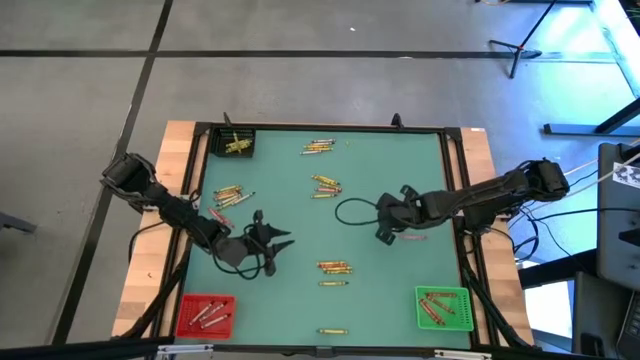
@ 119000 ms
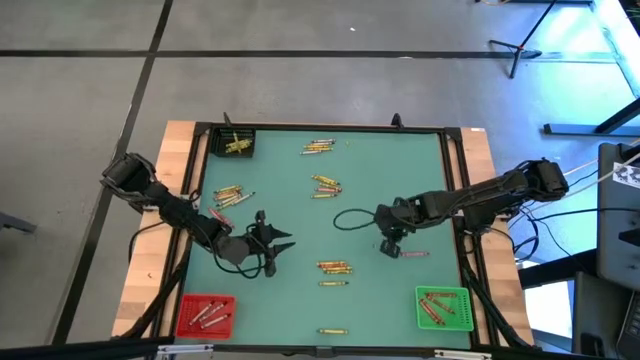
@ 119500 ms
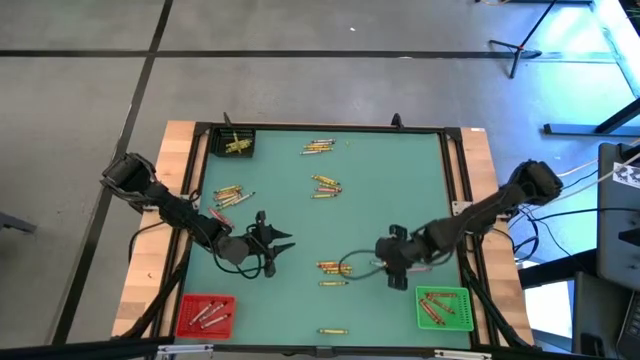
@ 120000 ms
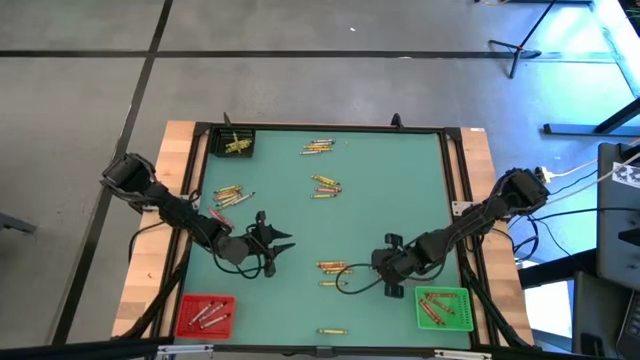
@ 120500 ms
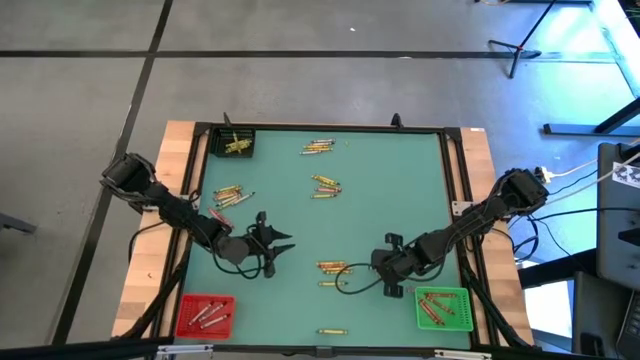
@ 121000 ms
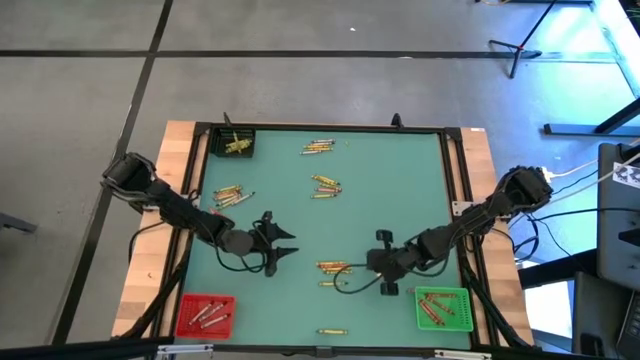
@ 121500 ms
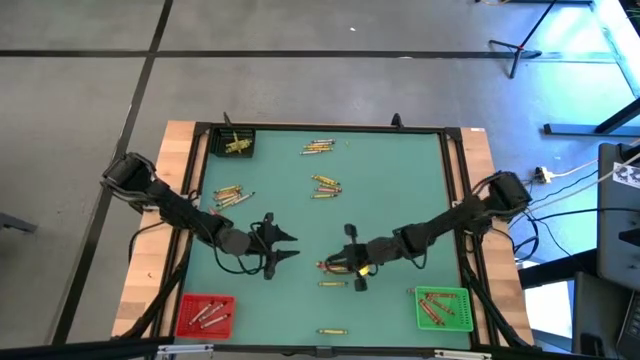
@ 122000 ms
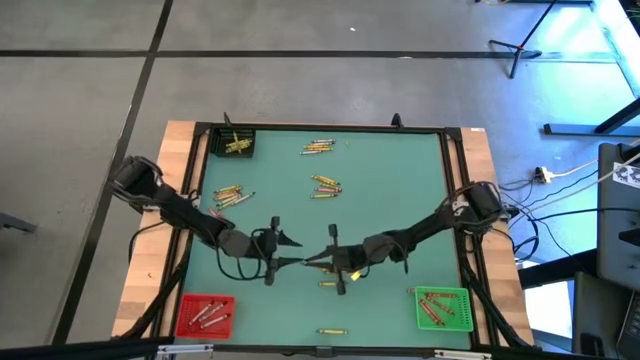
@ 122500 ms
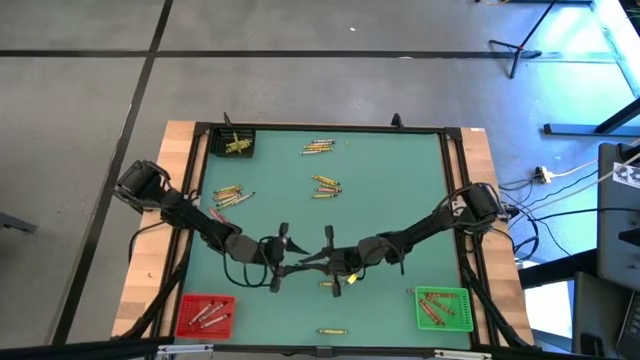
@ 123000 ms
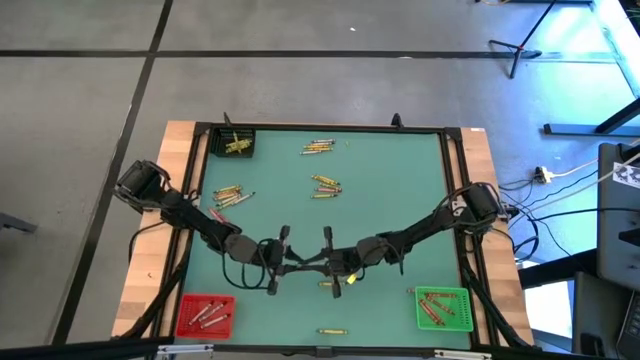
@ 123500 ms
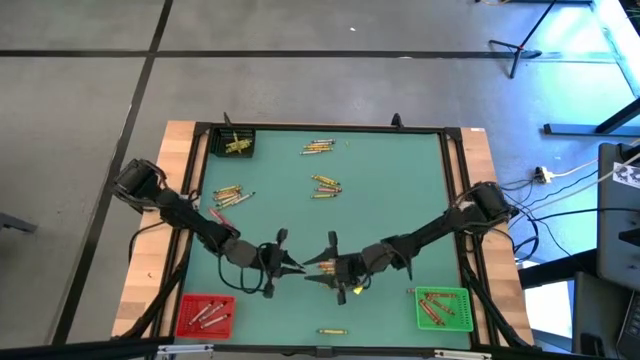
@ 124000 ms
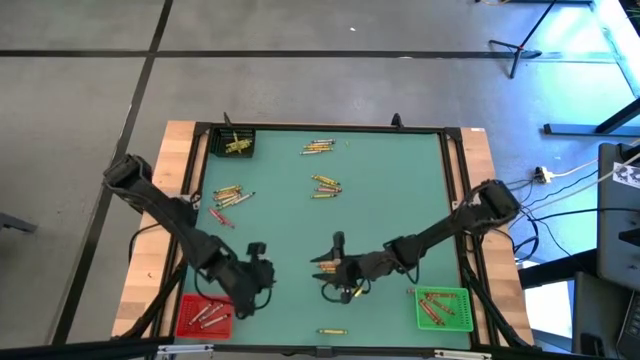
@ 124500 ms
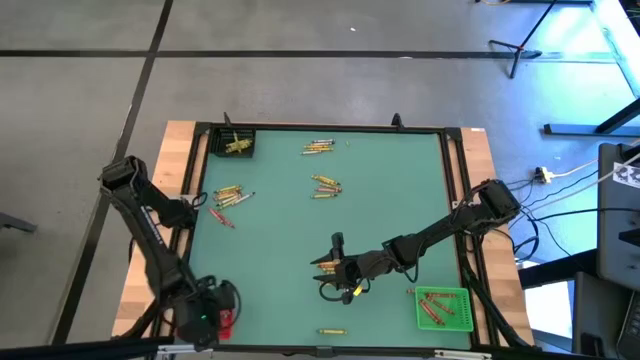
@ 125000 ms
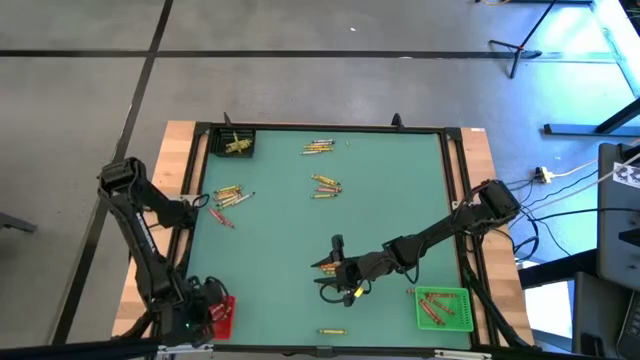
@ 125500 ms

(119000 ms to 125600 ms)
Task: Sort crayons
Put the black crayon into the red bin

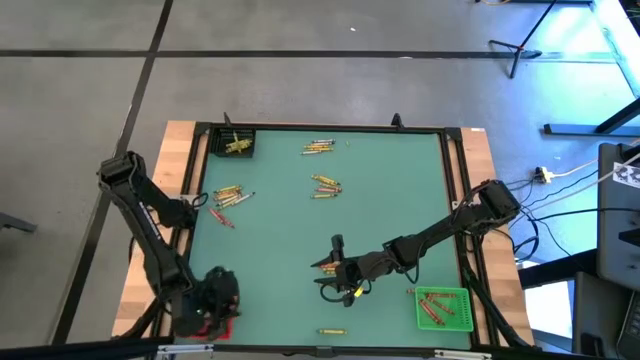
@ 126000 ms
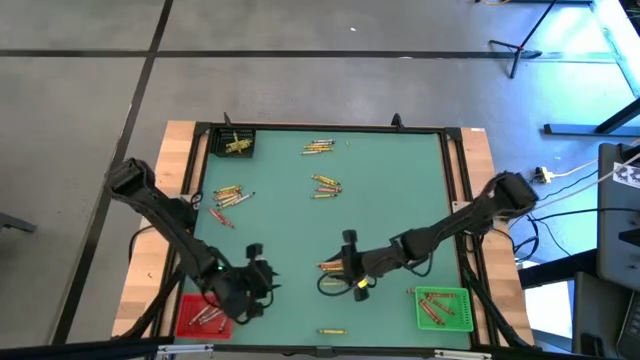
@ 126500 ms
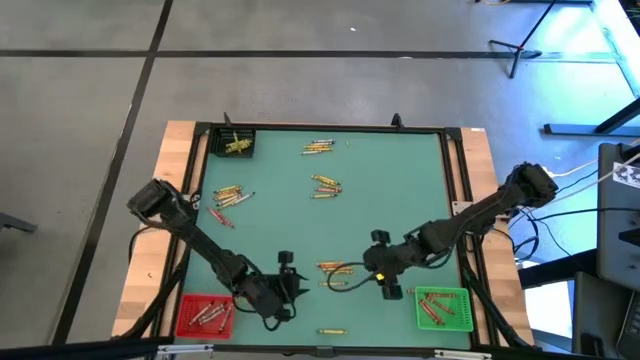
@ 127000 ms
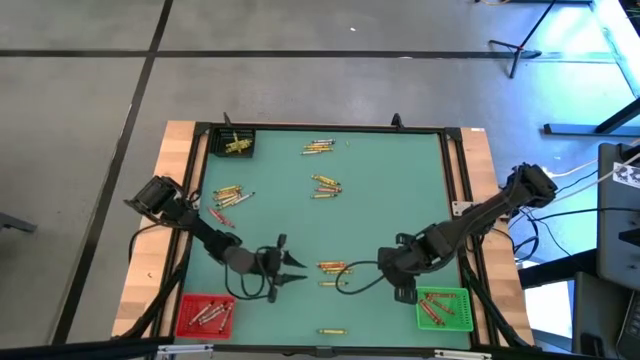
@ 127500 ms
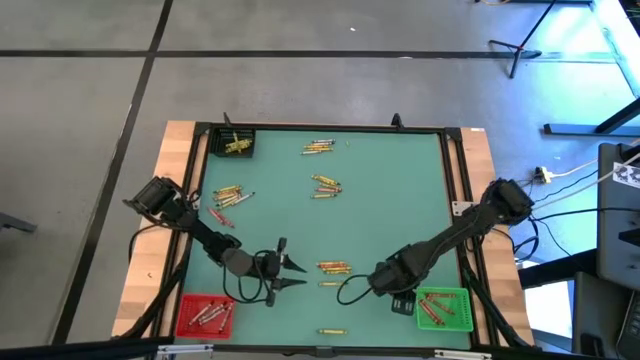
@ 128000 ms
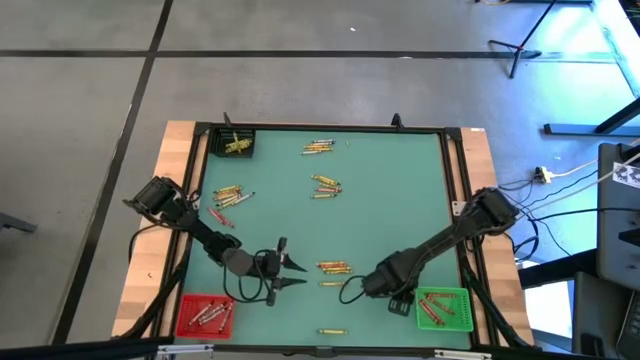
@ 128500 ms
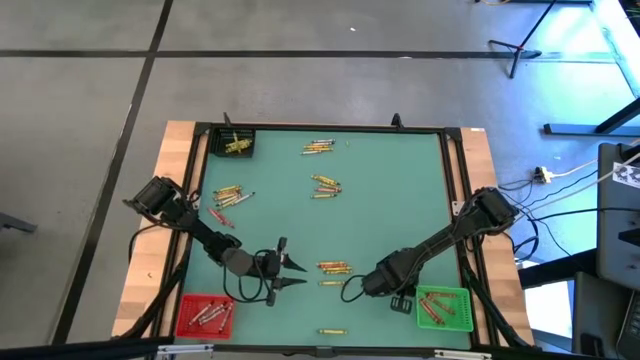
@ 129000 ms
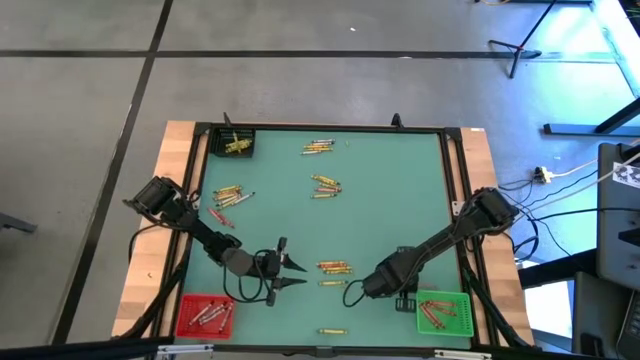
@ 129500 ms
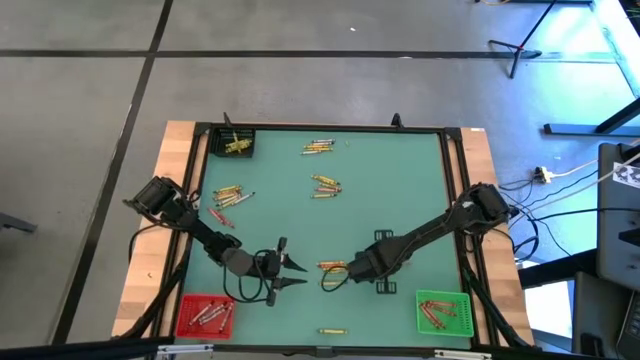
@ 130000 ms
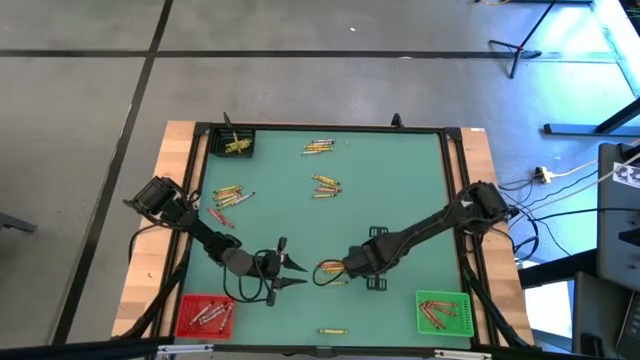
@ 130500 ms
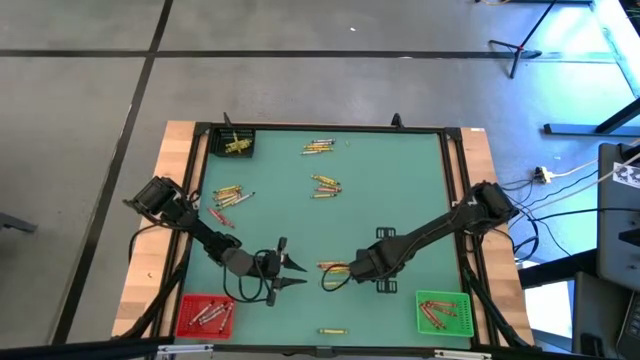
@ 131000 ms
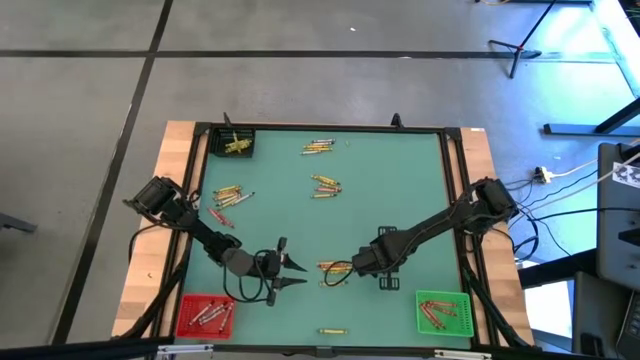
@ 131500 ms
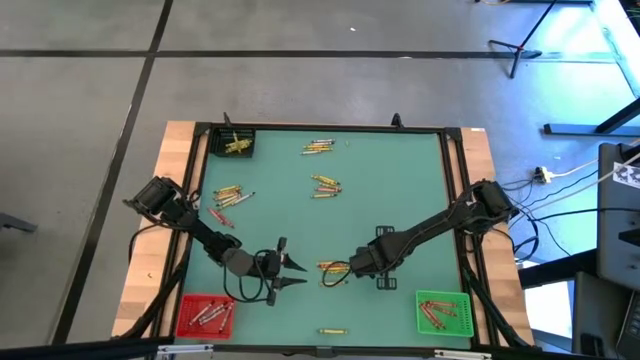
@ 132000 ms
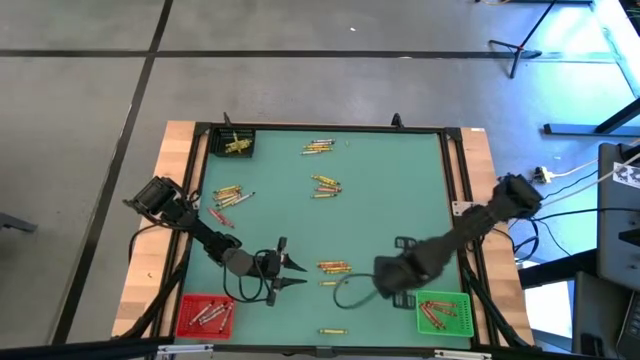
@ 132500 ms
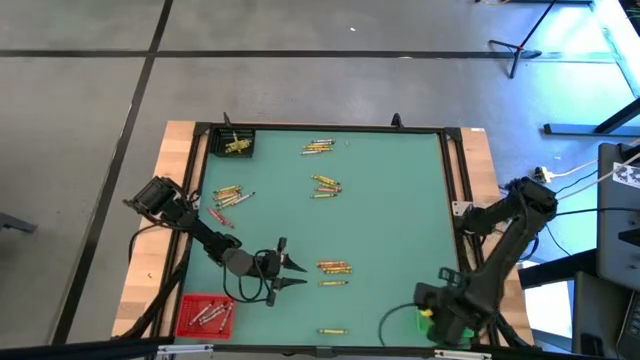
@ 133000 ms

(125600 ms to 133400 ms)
Put the red crayon into the green bin

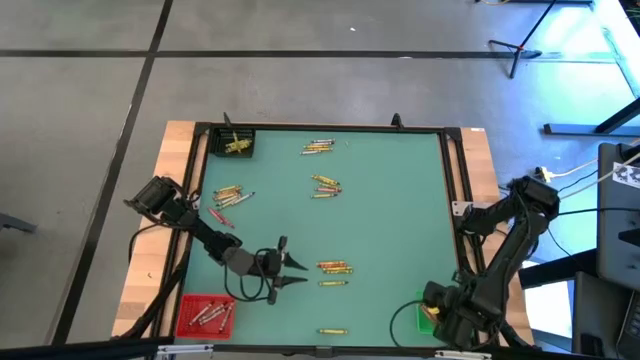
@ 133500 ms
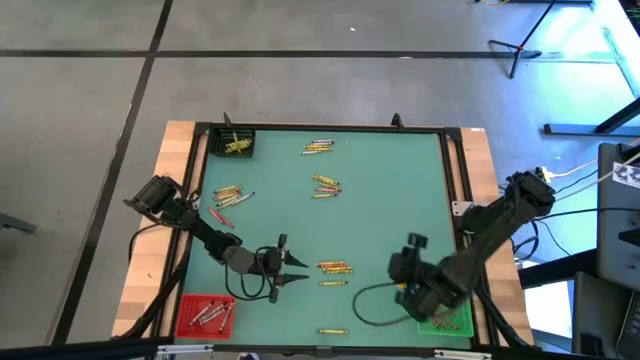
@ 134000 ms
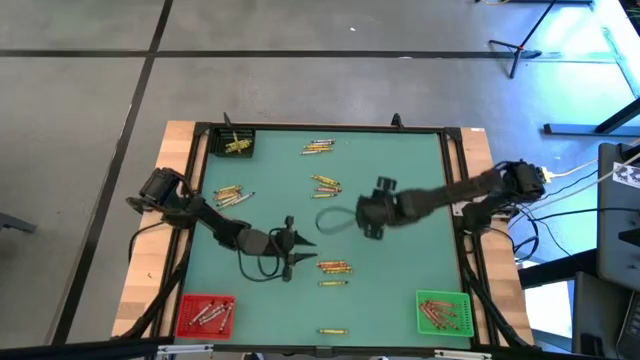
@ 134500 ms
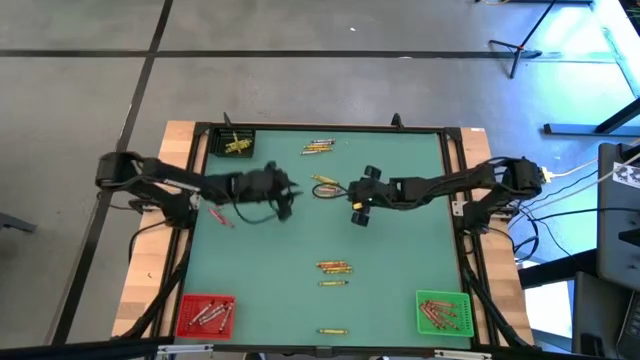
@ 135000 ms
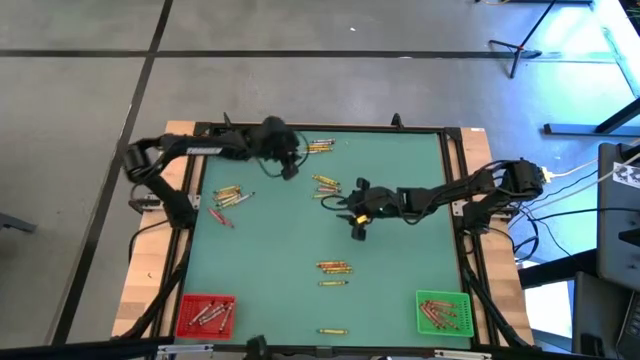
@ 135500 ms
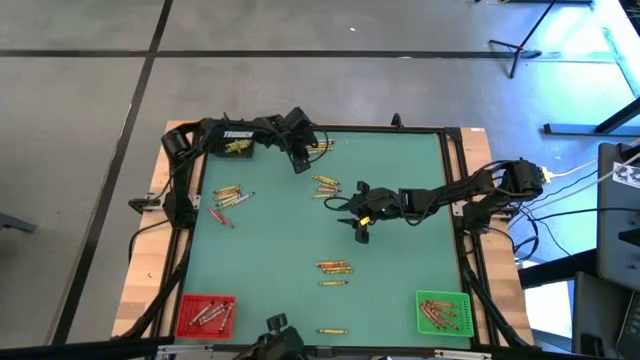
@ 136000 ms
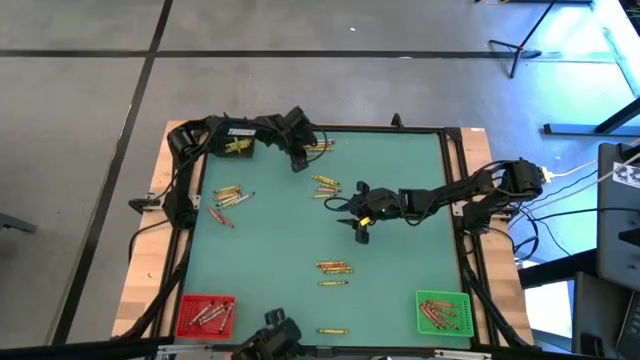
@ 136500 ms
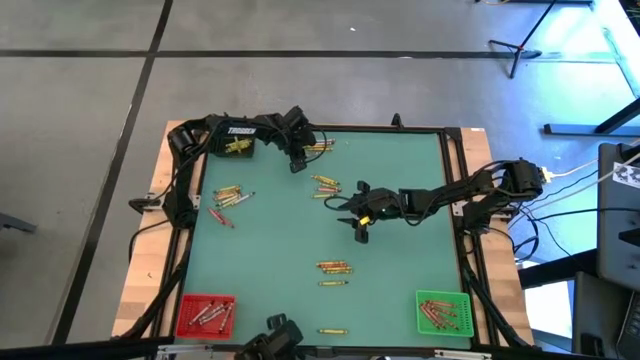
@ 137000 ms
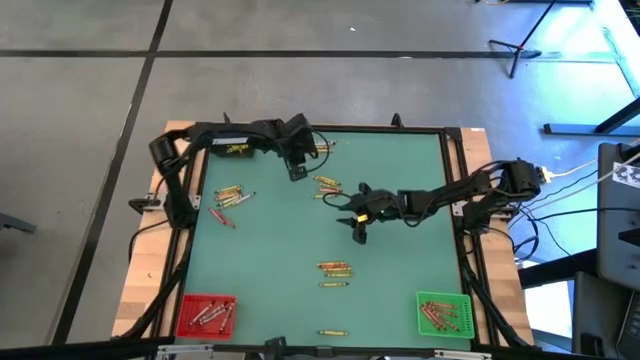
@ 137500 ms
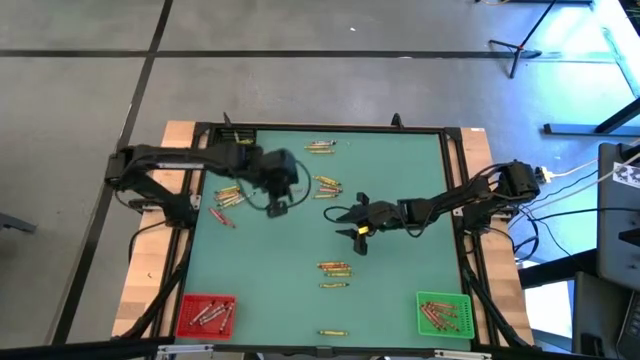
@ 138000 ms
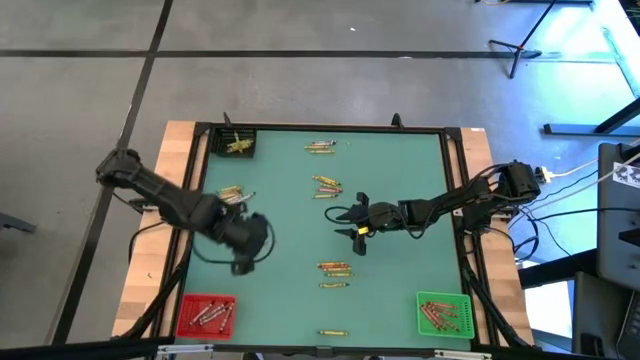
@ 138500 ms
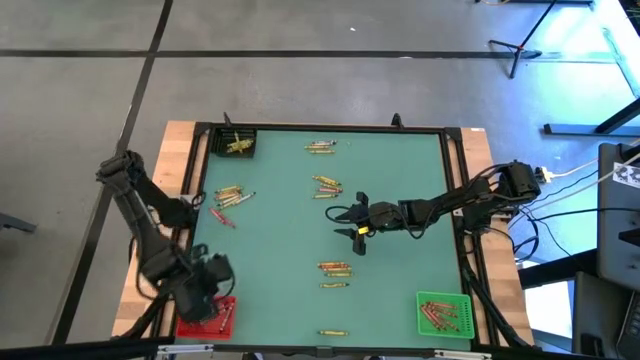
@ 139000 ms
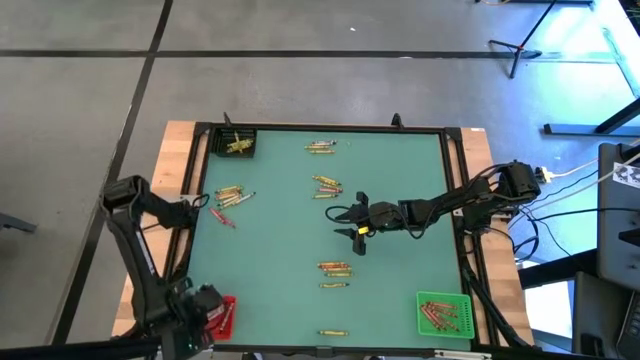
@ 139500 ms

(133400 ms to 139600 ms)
Put the black crayon into the red bin

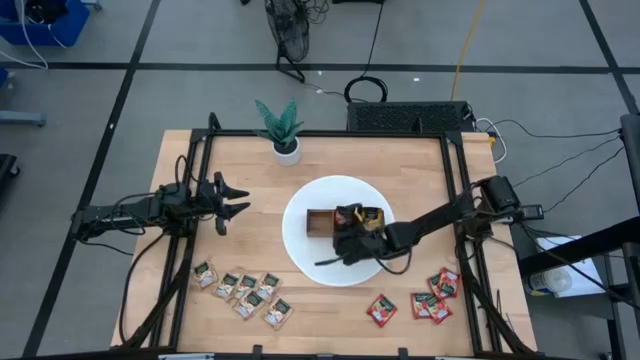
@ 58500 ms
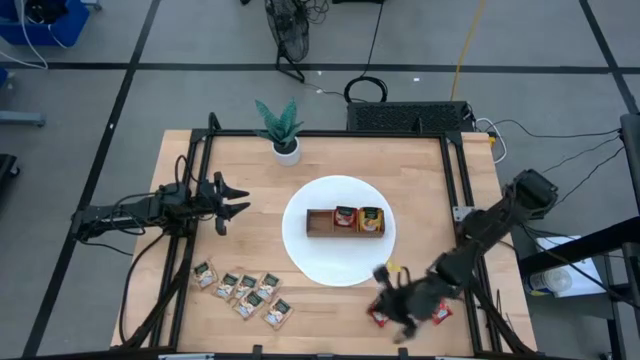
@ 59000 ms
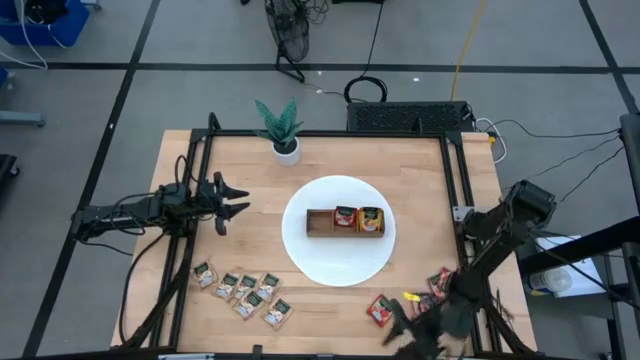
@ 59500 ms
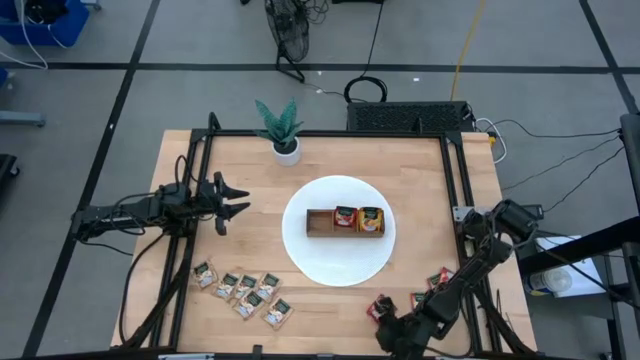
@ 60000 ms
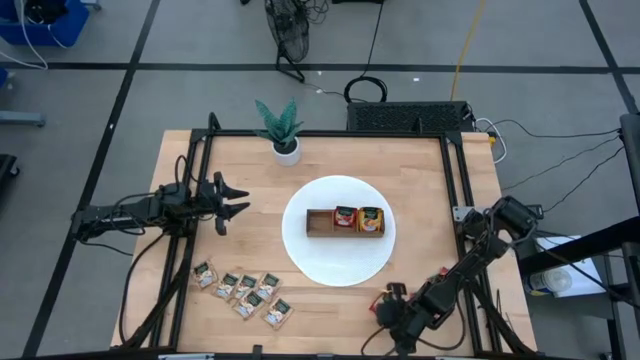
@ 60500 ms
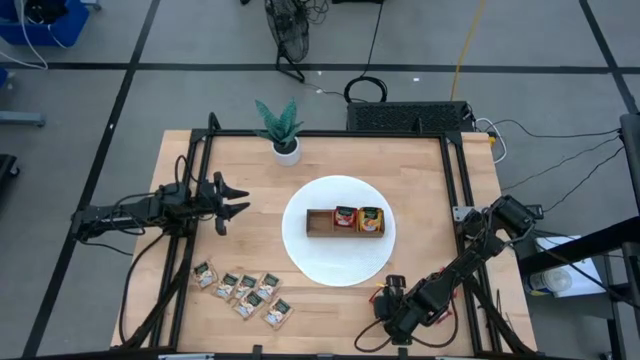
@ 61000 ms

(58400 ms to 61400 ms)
Task: Pick & Place Tea
Put the red tea bag into the middle section of the wooden organizer
